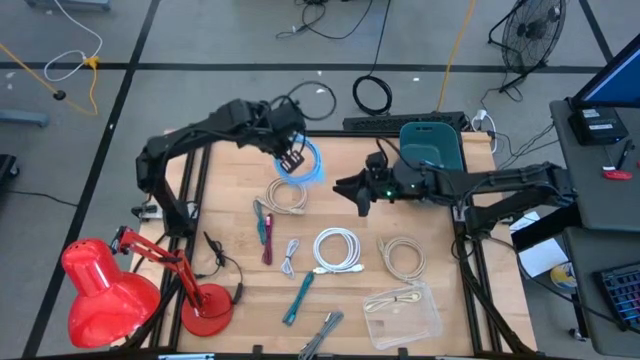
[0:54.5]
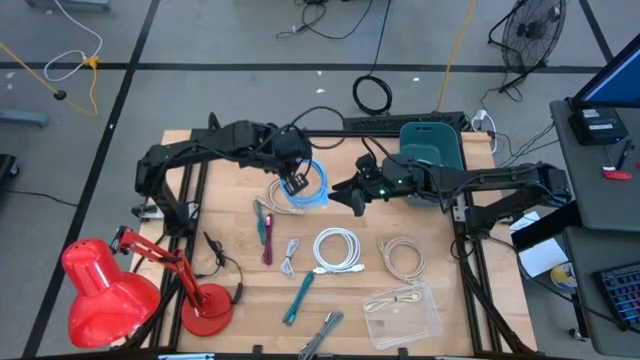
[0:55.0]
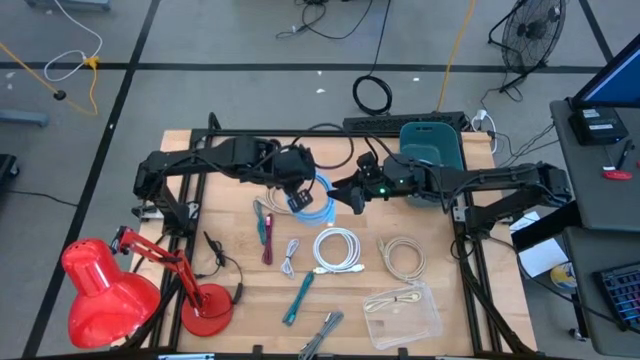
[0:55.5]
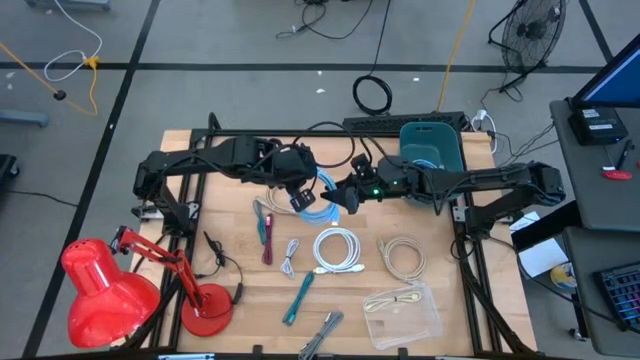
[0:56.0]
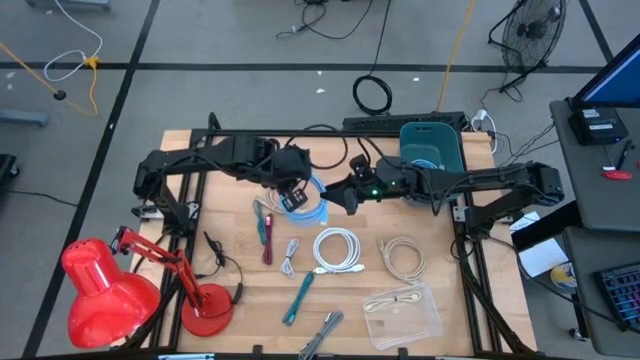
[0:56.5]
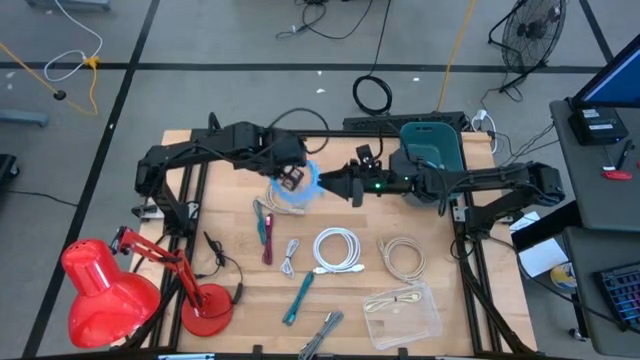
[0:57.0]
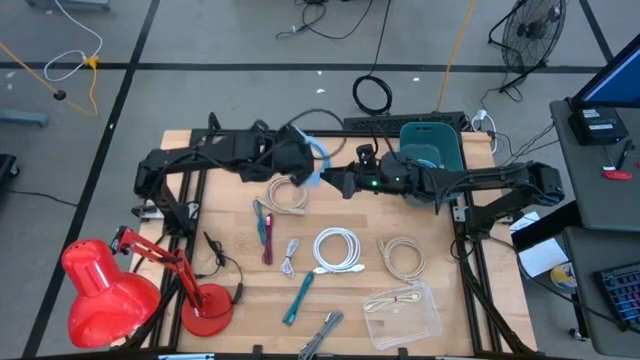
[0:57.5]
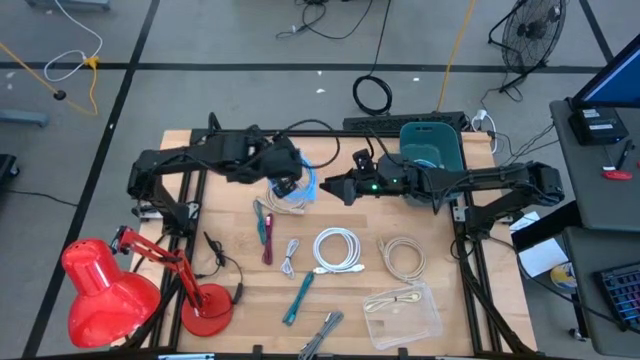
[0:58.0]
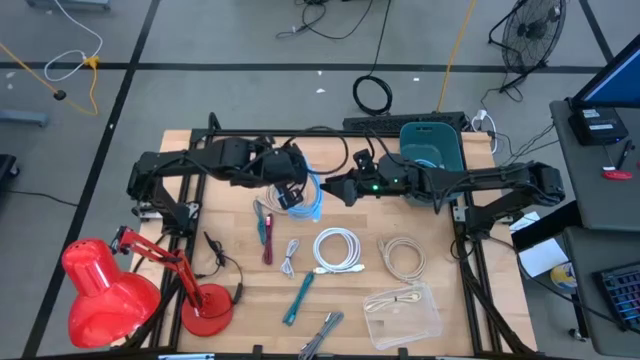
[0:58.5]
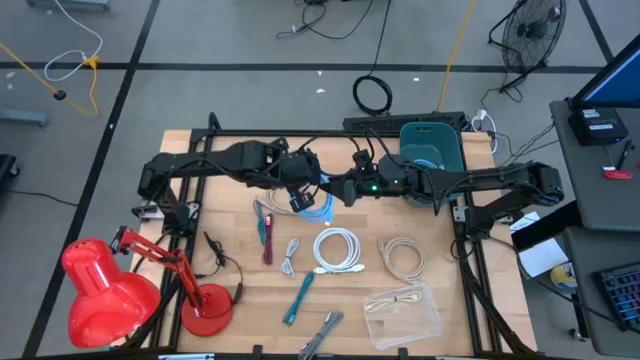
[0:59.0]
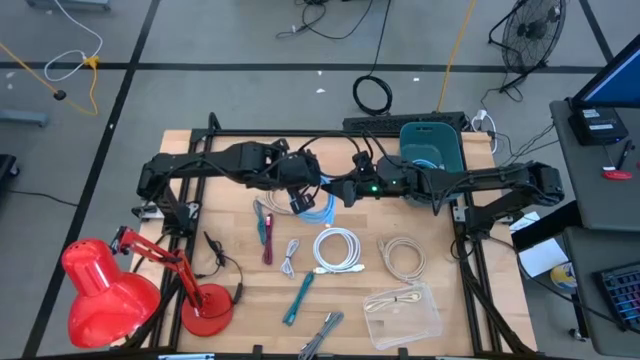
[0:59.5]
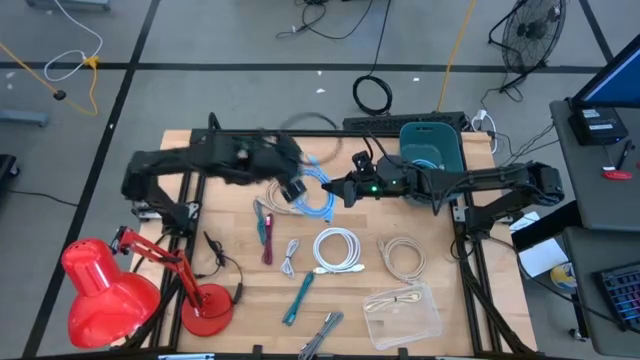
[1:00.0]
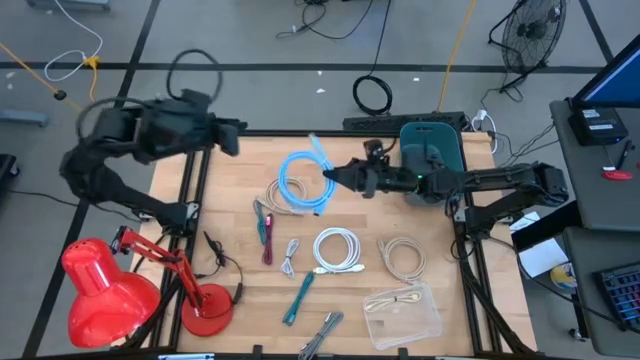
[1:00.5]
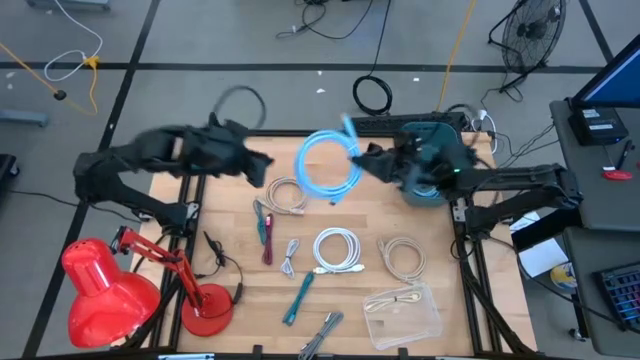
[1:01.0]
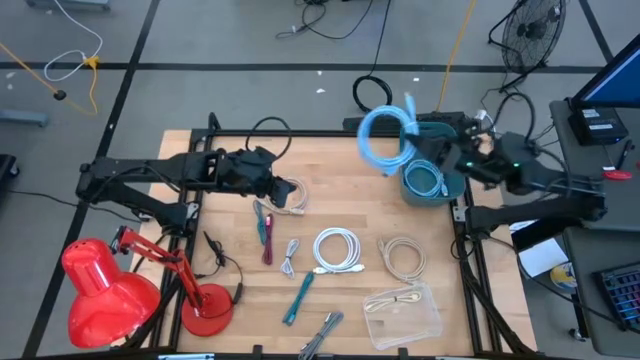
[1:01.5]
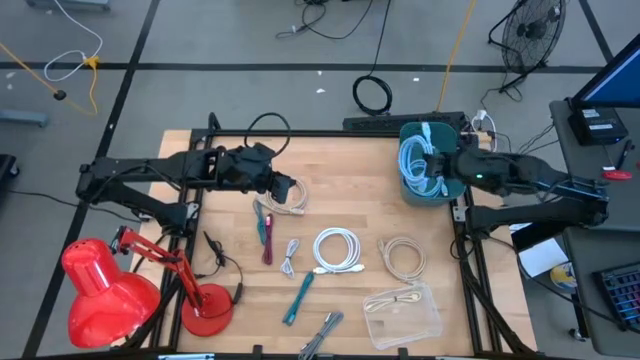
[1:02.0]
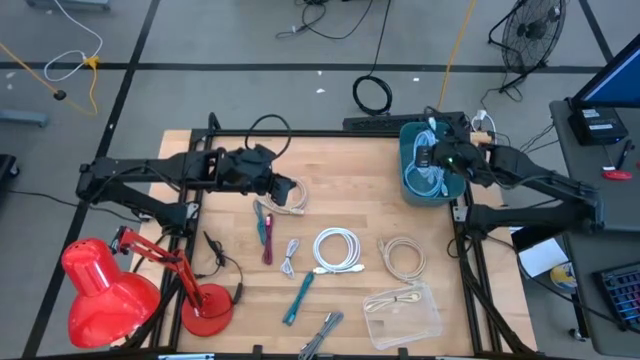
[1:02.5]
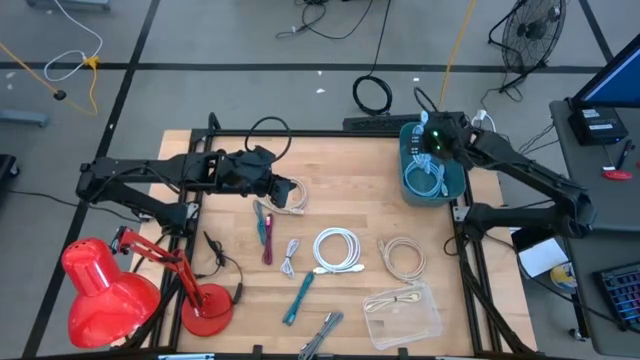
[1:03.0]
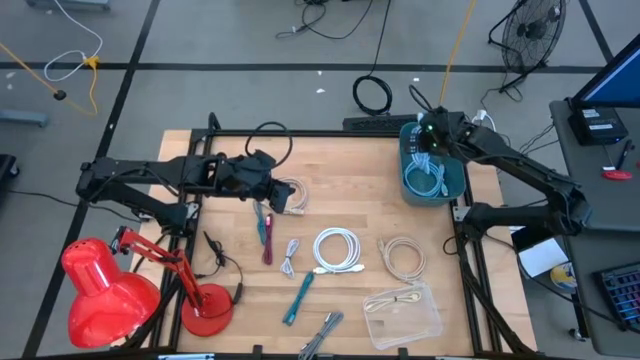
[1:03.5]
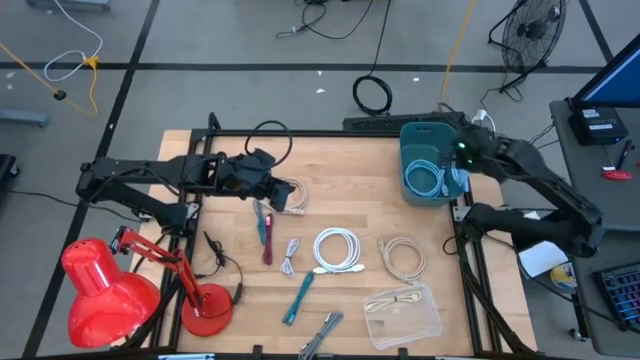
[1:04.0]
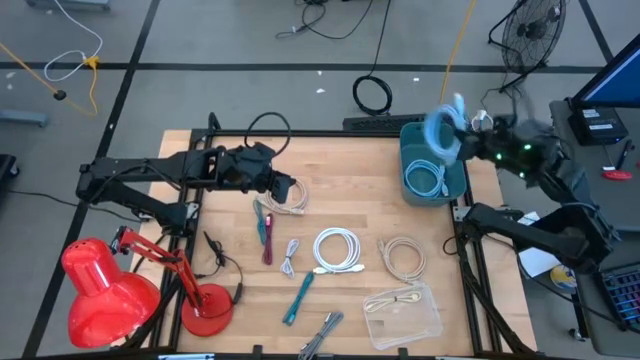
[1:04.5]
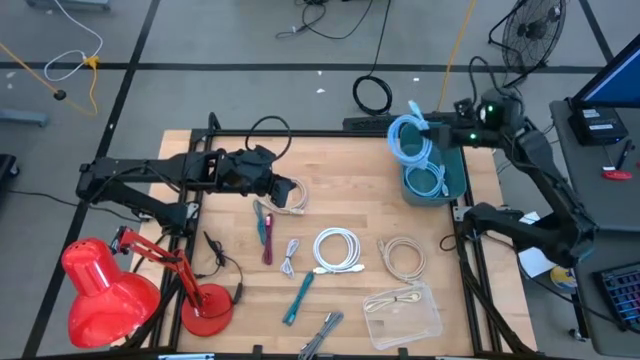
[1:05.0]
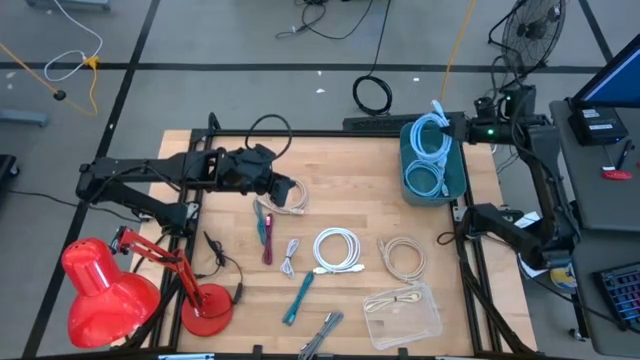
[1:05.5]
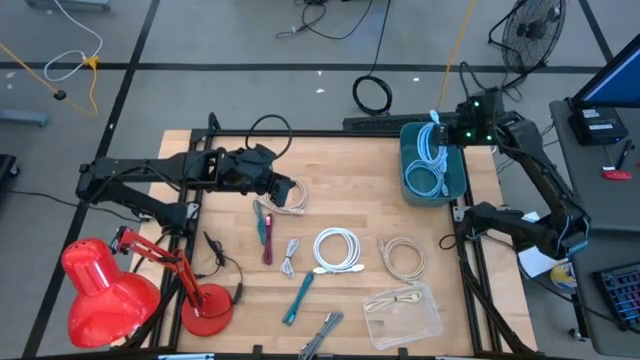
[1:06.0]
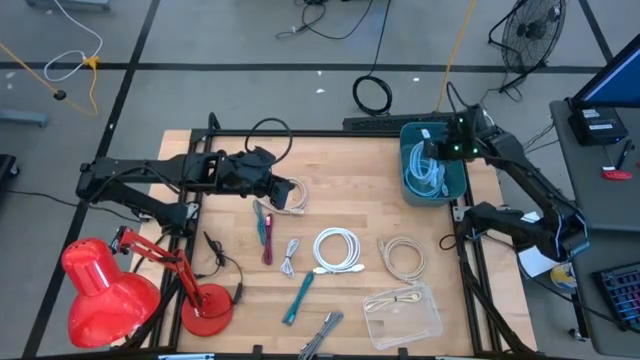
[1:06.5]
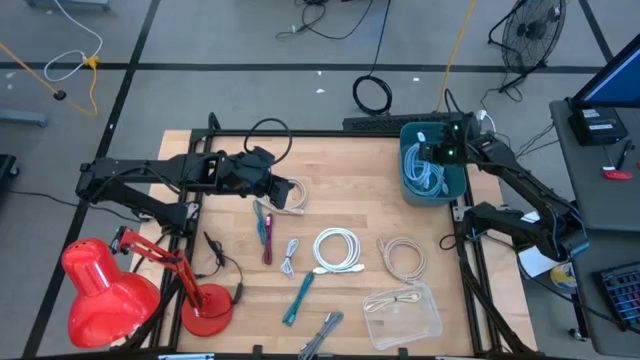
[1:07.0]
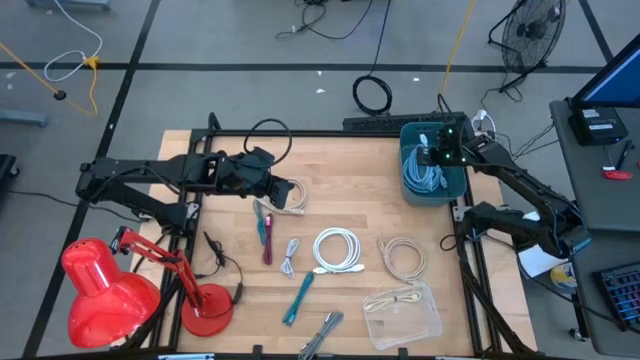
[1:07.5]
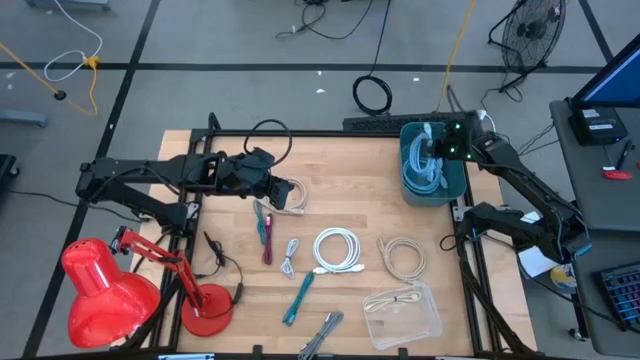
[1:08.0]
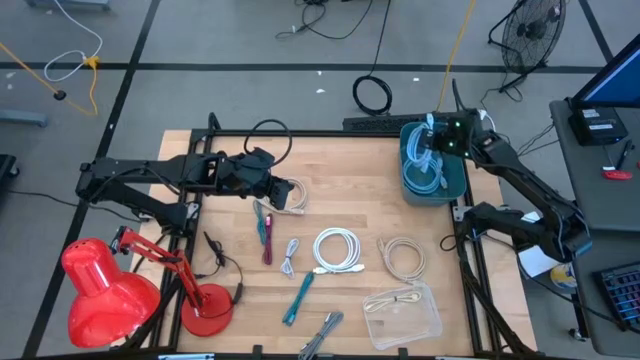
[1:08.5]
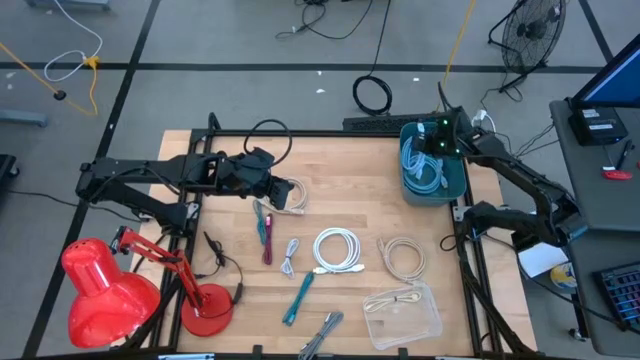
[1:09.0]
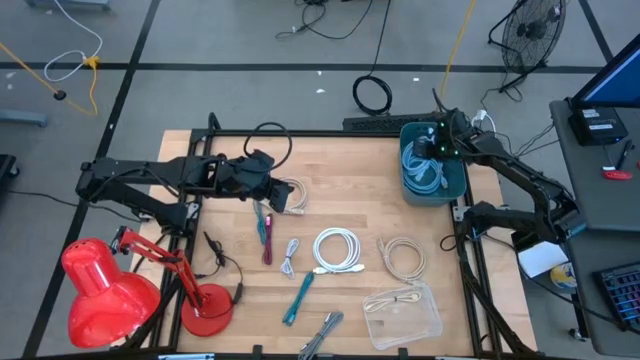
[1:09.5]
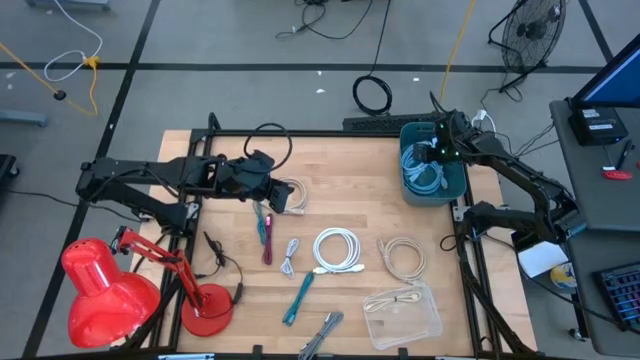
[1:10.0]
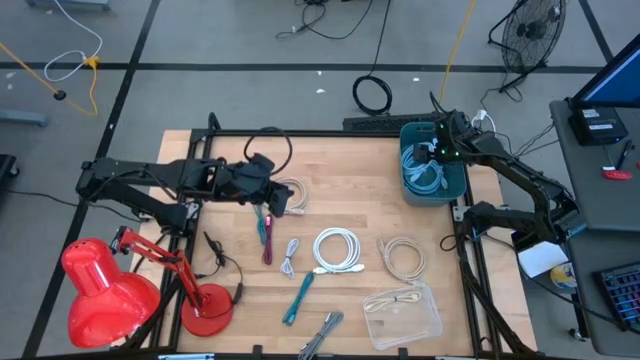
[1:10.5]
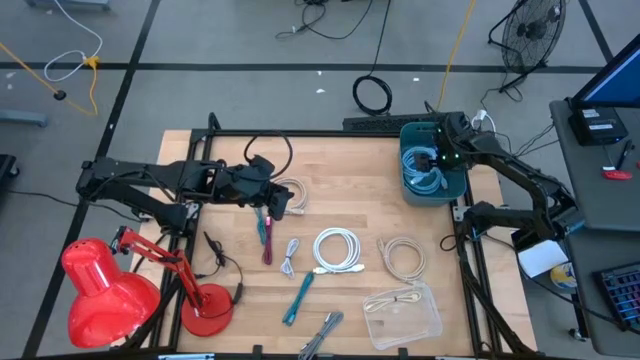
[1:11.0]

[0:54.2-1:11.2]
Task: Pick & Place USB Port
Put the blue hdmi cable into the blue bin

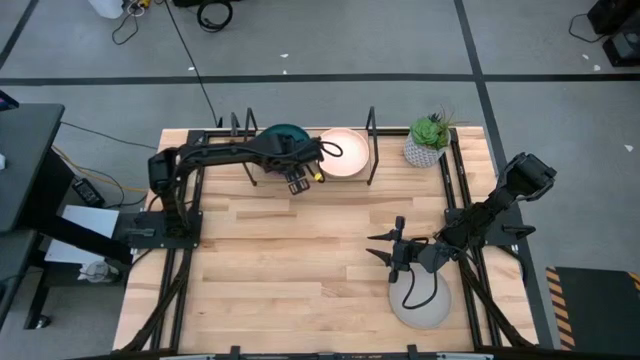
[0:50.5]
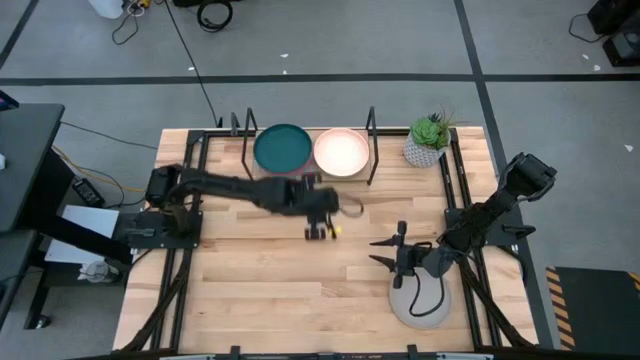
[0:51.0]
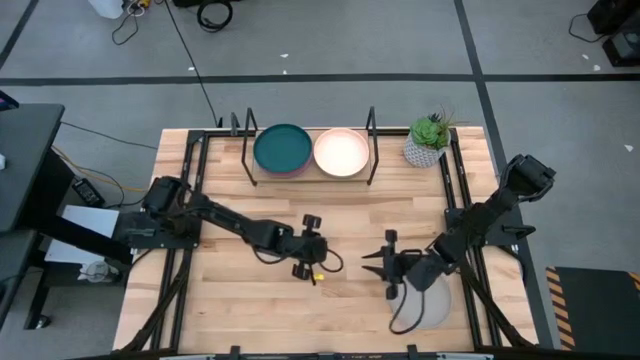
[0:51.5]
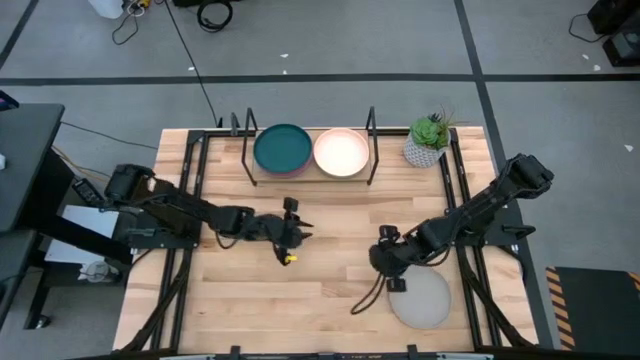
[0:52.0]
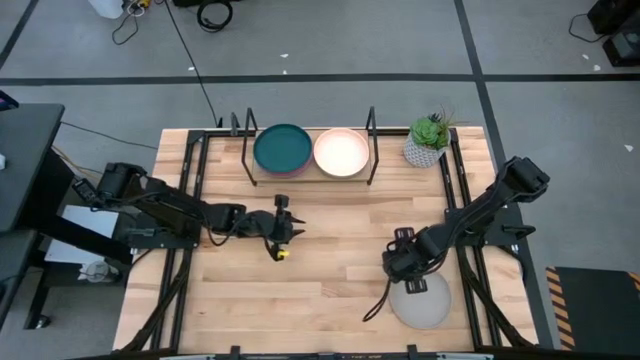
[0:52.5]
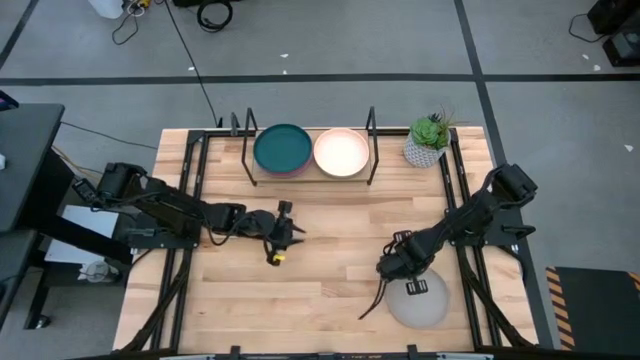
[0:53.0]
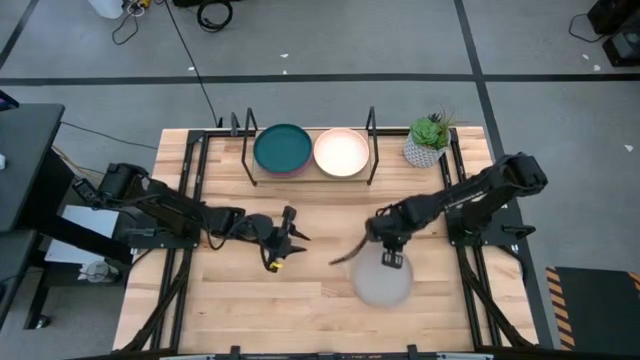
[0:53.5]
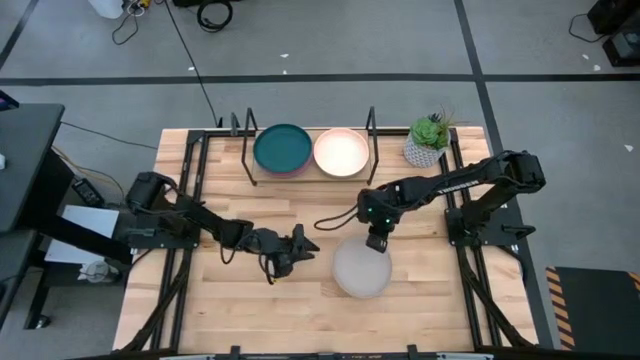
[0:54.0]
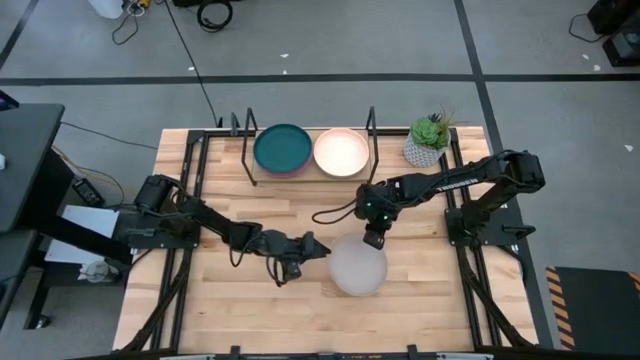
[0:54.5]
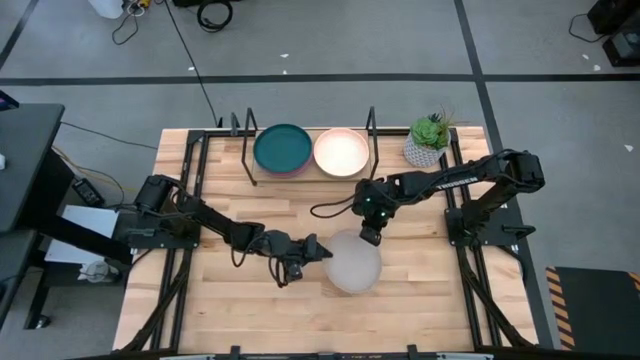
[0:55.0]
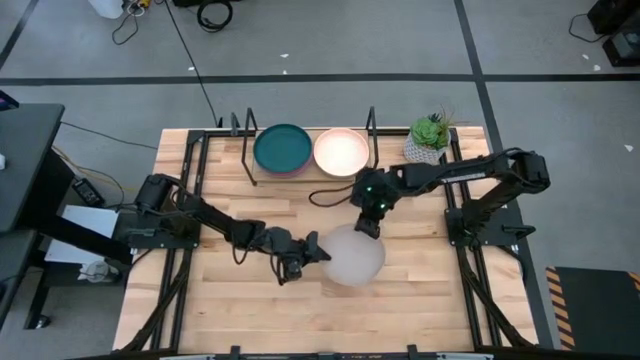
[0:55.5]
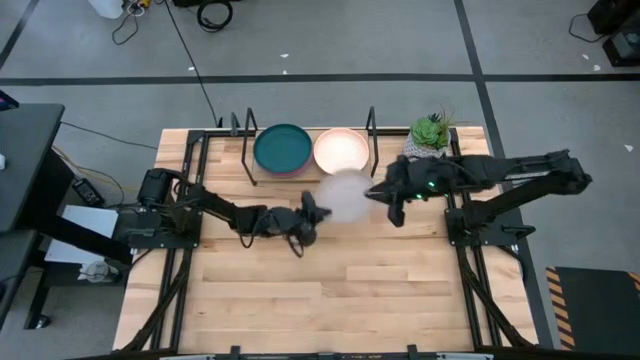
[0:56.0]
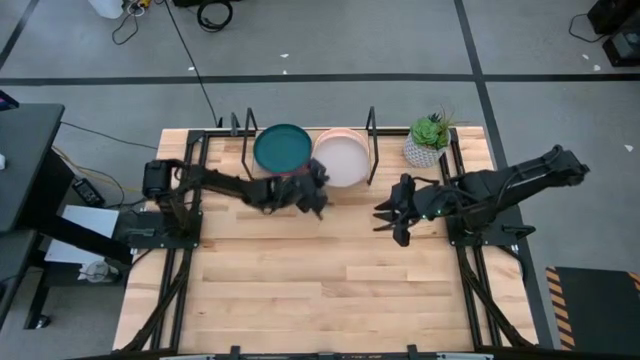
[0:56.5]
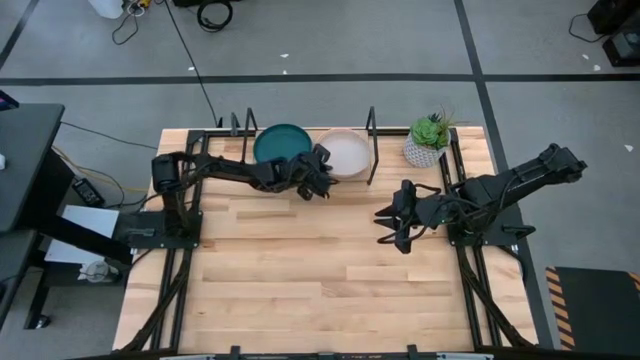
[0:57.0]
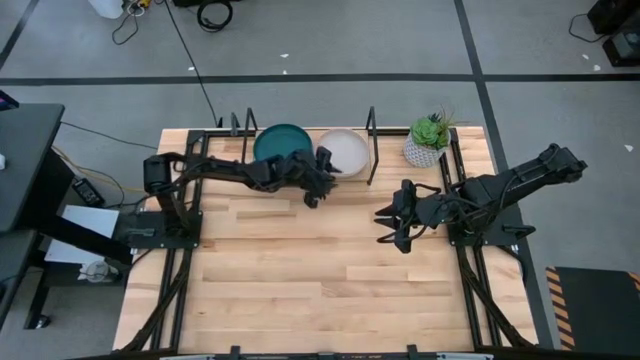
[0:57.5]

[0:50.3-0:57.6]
Task: Place and stack plates onto a shelf
Stack the gray plate on top of the white plate on the shelf
